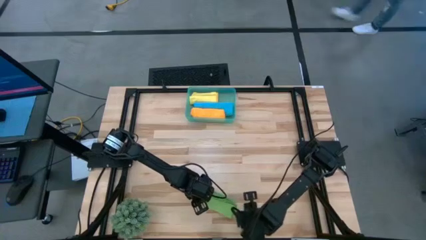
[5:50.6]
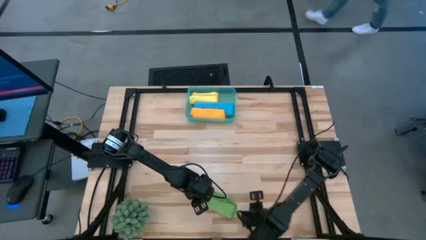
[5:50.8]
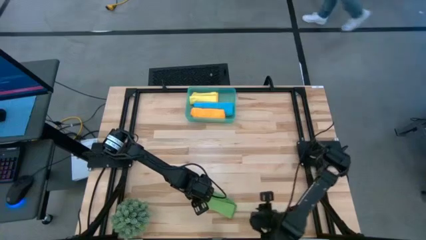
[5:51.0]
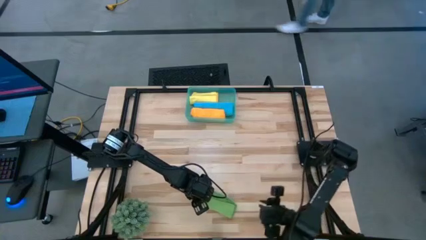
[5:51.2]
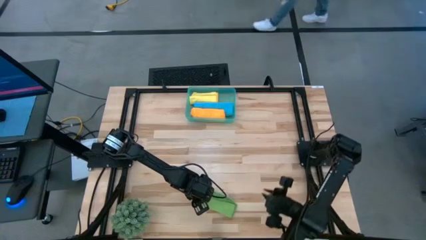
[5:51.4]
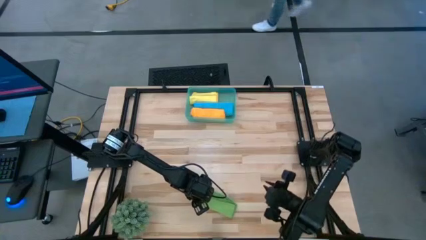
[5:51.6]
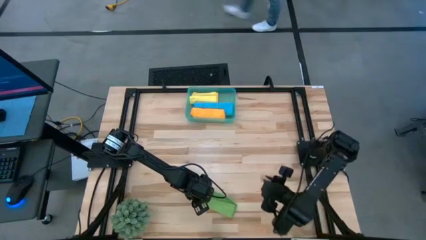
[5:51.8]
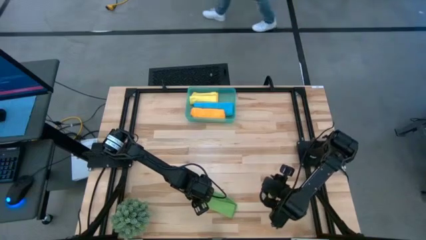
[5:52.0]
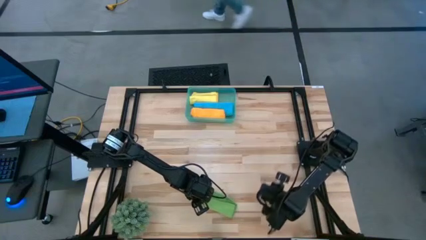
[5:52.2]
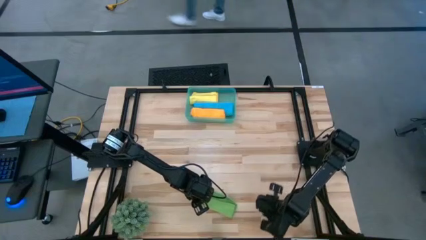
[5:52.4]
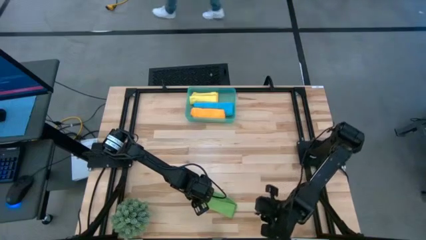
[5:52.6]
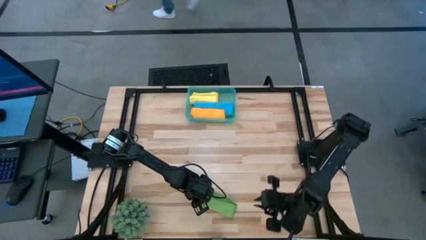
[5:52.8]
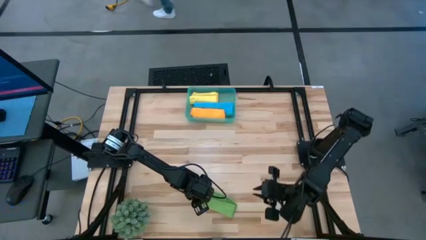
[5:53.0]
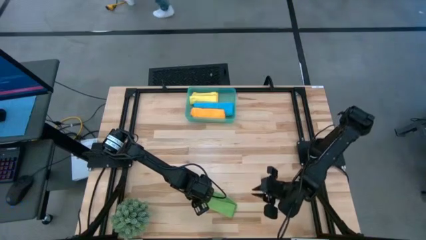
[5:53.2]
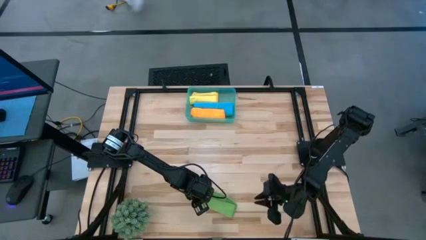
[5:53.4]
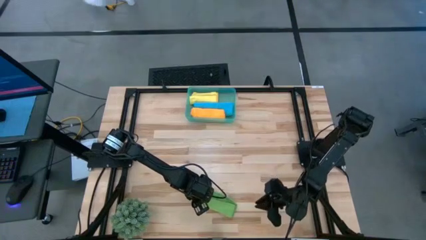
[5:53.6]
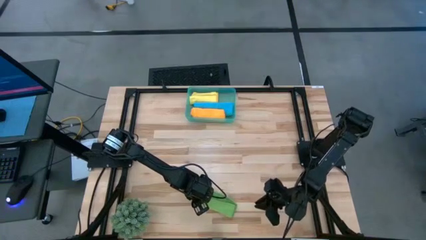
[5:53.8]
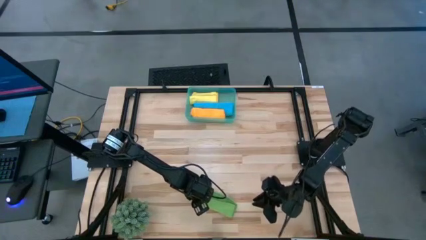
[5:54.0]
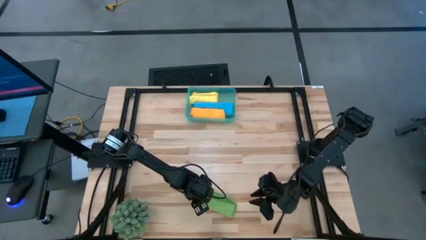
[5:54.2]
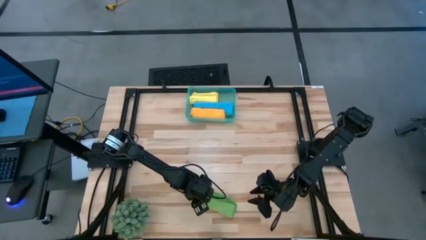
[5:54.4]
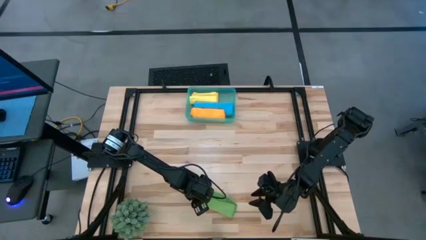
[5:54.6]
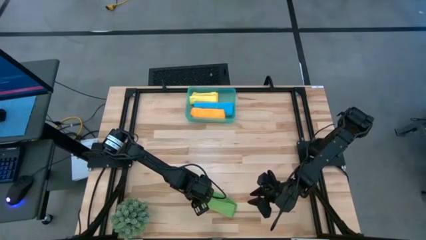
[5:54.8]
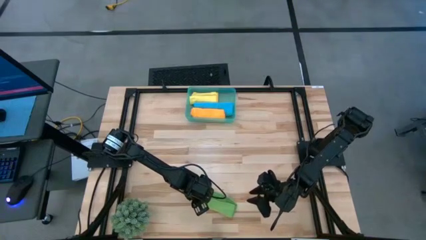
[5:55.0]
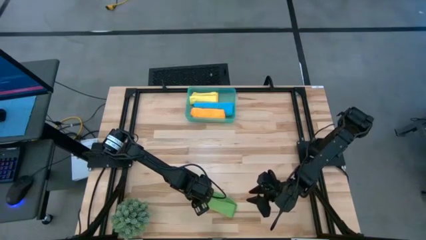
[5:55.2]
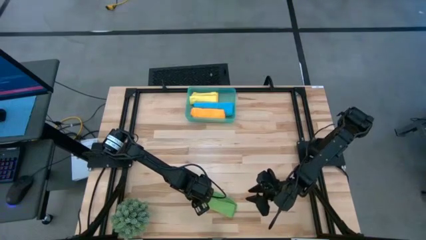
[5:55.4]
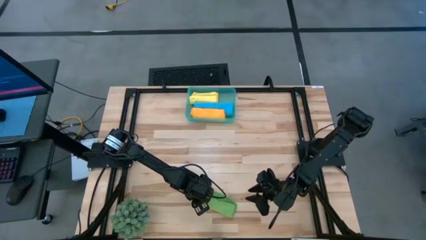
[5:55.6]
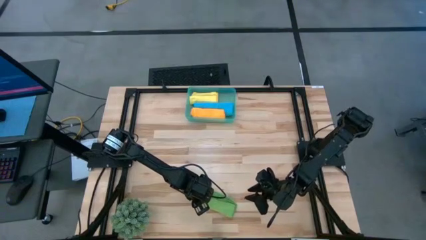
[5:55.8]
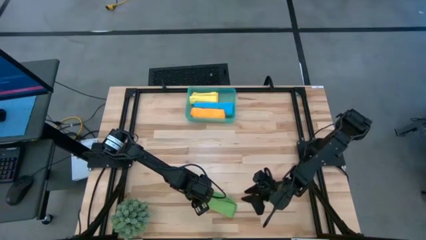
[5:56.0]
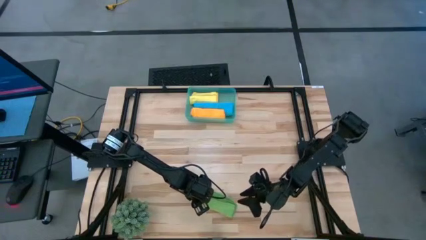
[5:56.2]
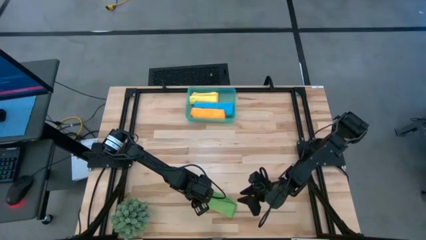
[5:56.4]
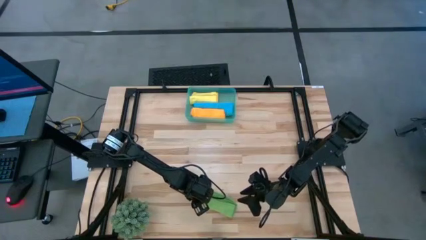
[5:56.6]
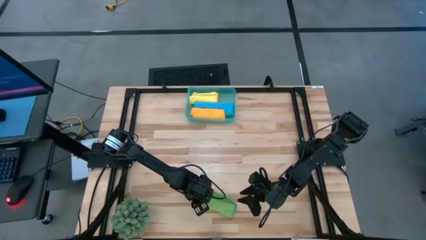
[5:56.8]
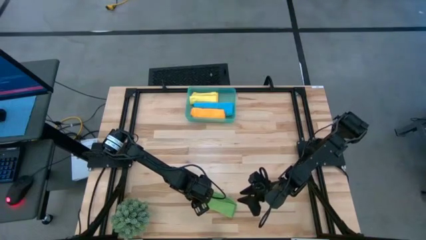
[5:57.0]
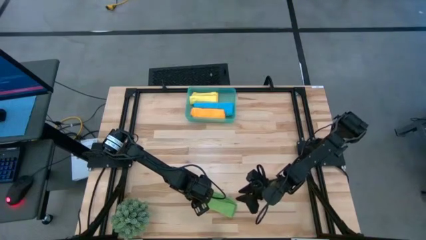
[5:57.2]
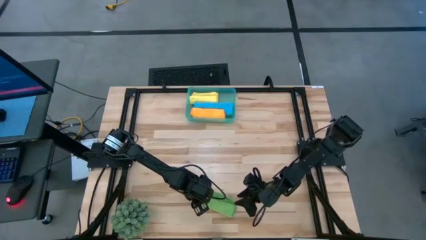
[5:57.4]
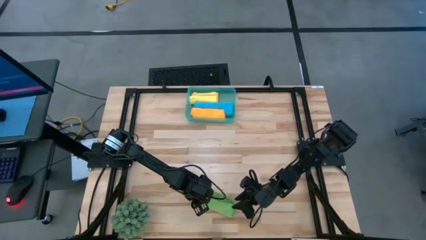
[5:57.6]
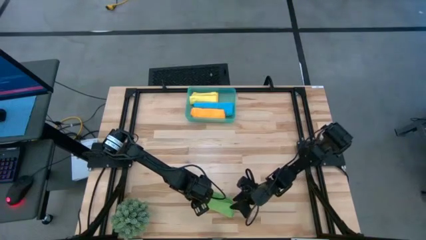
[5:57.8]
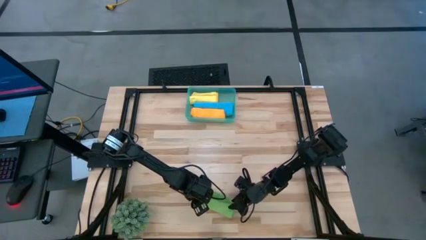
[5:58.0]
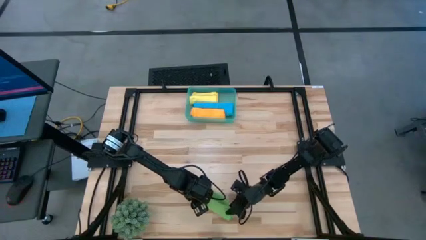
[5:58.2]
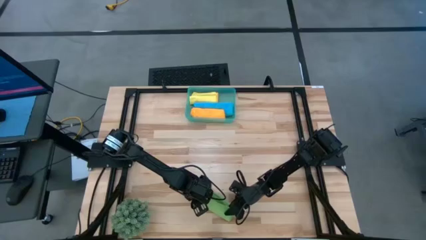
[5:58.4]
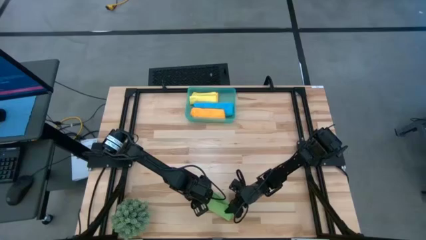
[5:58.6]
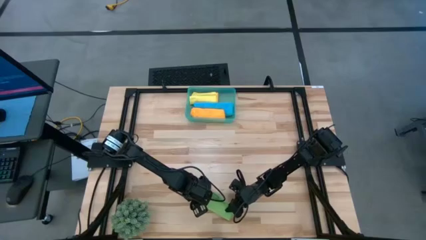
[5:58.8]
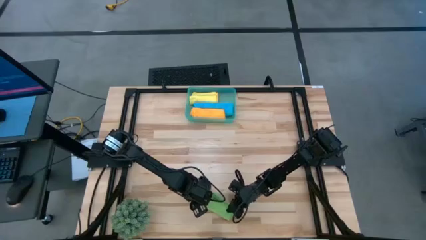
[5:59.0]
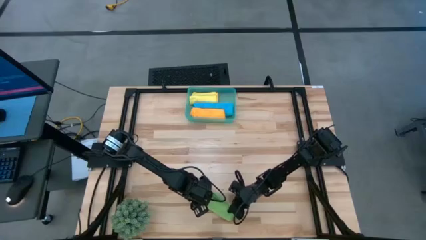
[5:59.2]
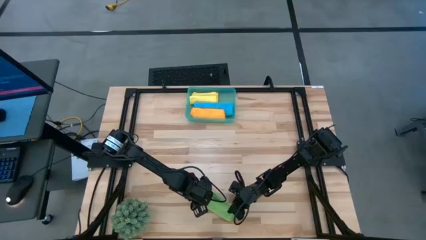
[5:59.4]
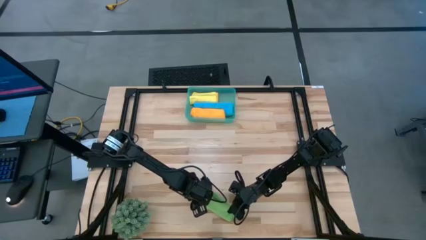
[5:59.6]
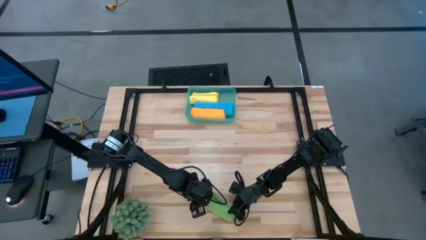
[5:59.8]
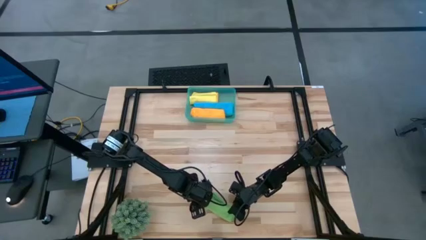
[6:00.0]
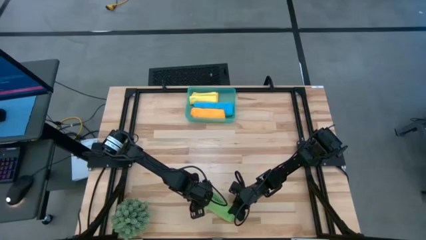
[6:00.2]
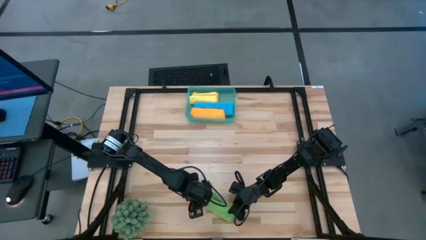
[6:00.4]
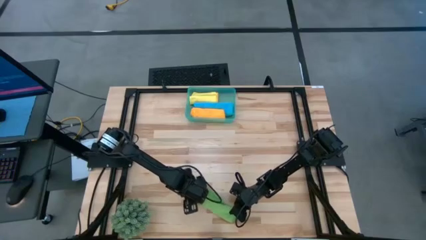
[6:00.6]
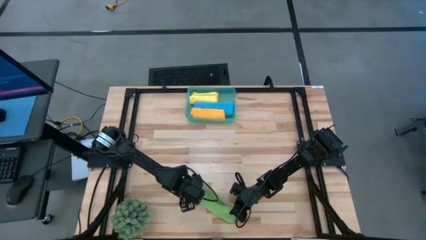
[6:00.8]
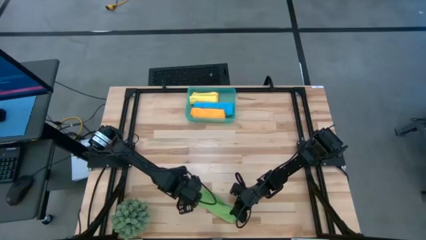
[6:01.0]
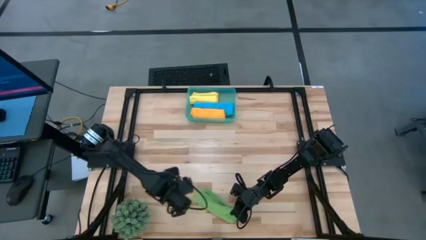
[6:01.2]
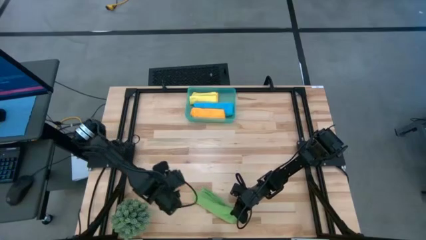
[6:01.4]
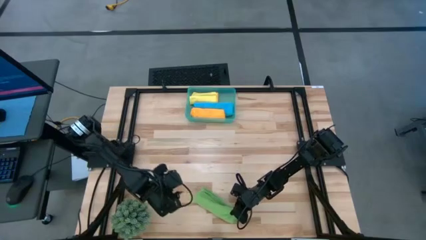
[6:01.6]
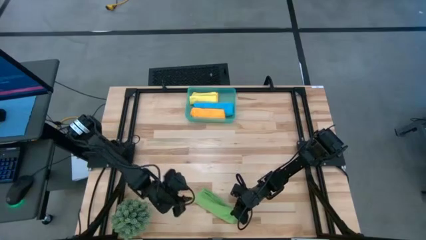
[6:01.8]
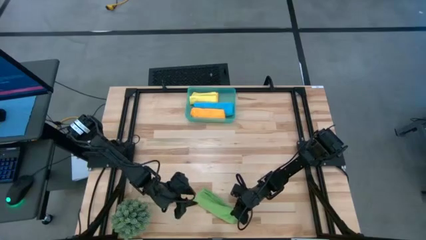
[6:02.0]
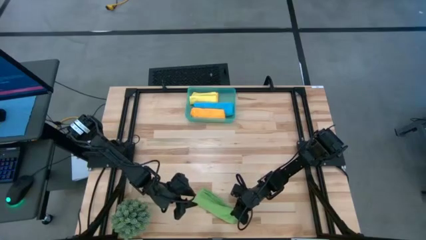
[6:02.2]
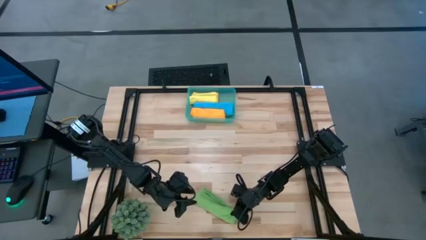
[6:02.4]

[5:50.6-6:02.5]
Task: Roll microfiber towels into tight, uniform cylinder then place into a basket
Put the rolled green microfiber towel into the green bin

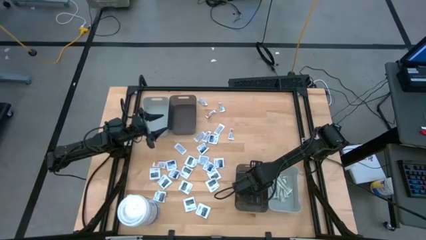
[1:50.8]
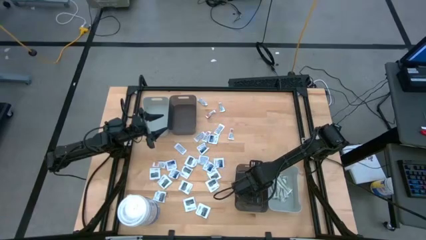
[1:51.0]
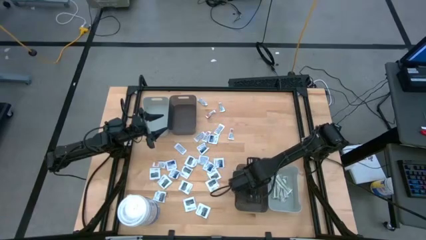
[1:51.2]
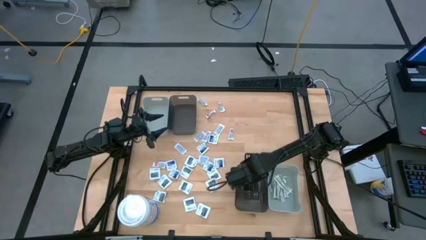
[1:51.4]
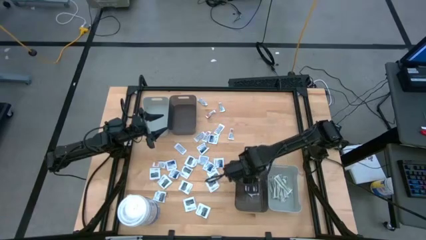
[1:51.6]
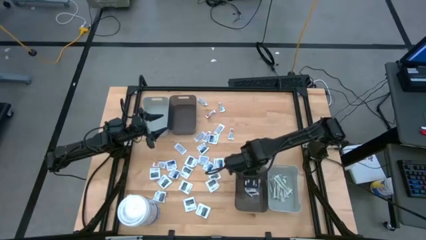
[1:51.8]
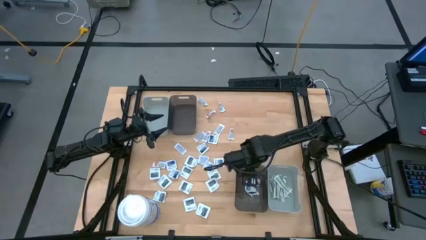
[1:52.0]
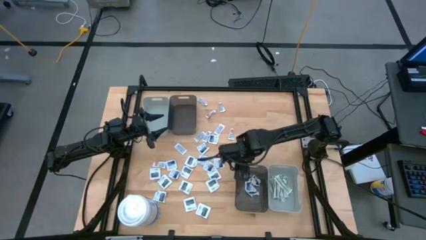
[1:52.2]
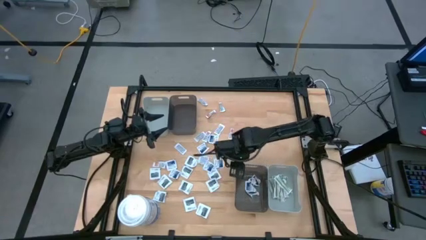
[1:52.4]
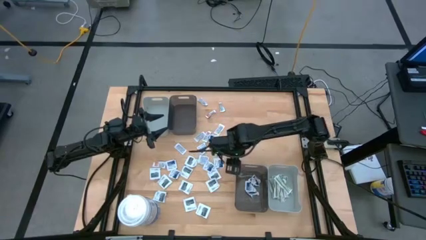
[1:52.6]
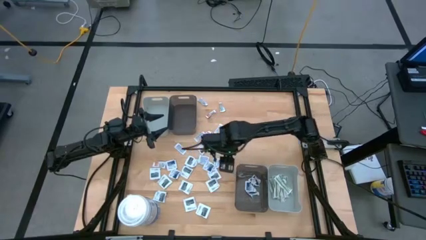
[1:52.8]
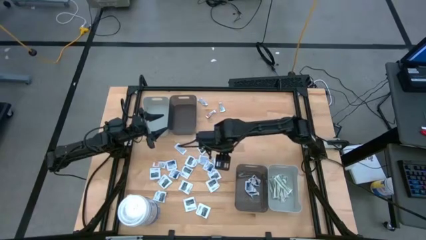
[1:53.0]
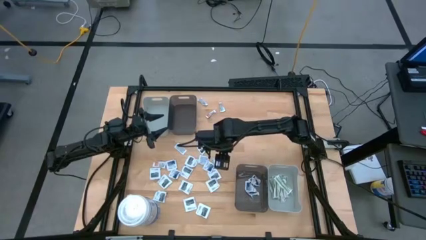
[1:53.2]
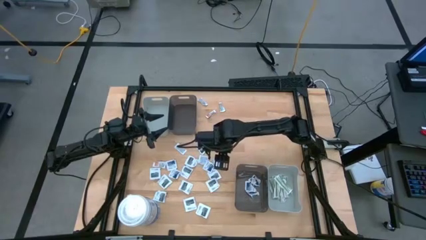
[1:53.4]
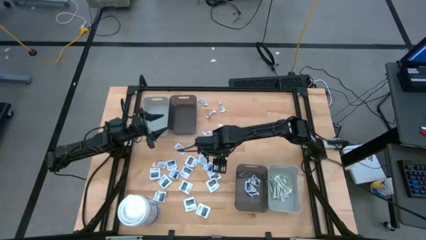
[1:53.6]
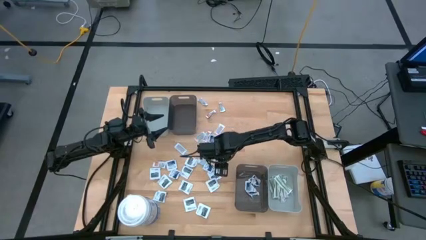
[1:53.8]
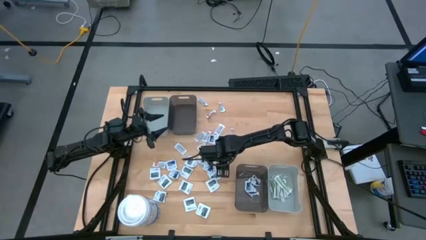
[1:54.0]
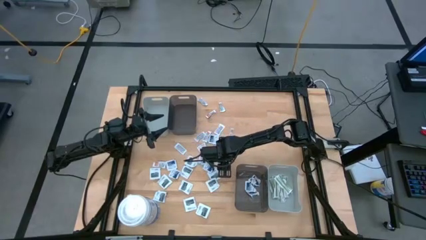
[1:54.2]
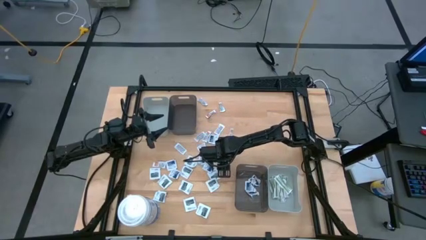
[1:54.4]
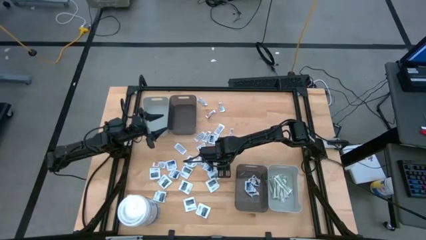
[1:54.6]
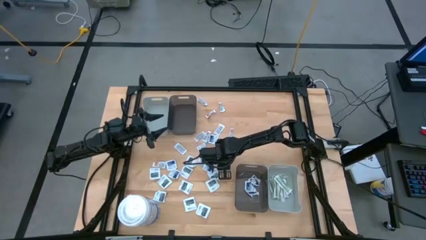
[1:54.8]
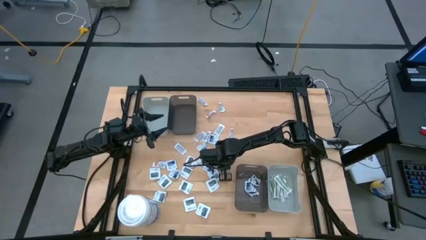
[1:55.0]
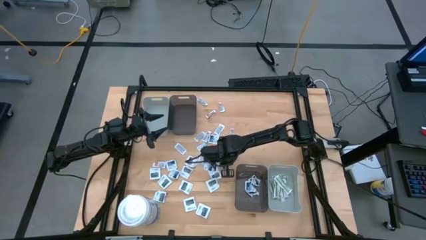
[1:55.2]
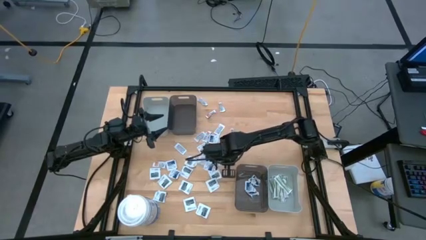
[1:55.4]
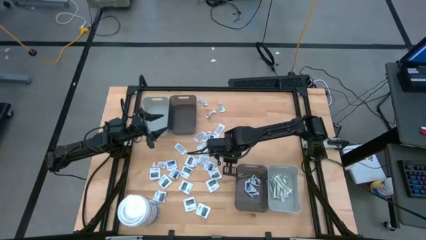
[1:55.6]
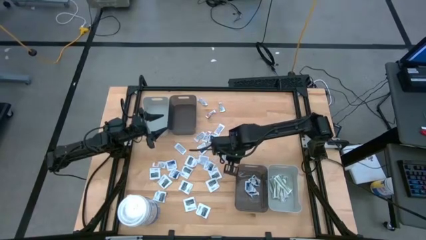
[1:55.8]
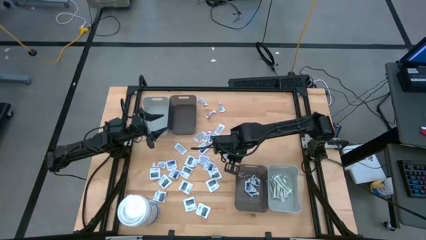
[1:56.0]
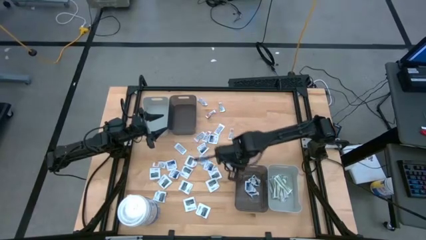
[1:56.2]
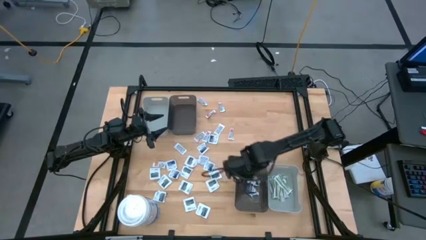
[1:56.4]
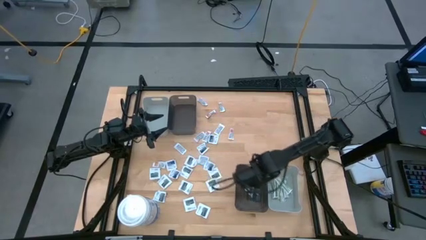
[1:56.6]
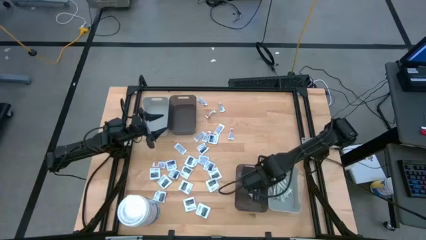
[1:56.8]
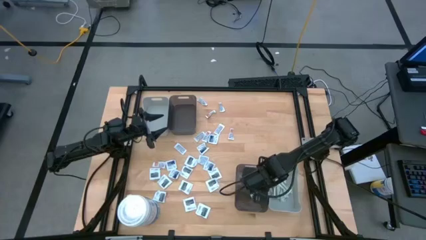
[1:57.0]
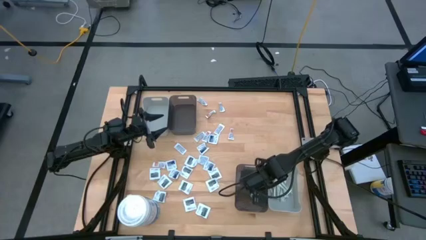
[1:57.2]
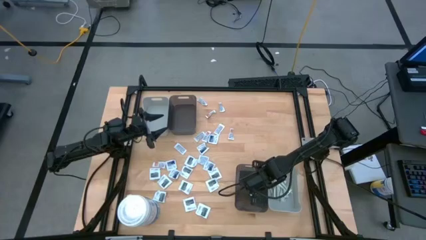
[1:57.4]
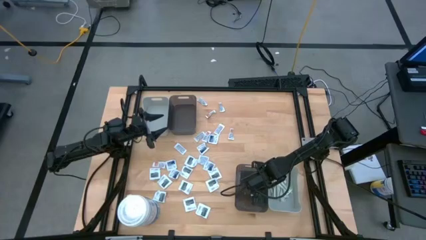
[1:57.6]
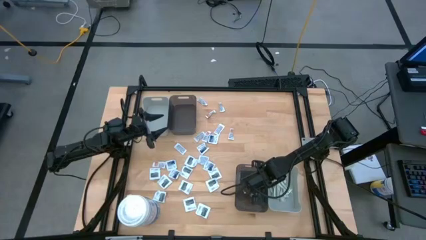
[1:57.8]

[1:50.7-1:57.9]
Task: Pick & Place First Aid Supplies
Put the white alcohol pad into the bottom black bin
